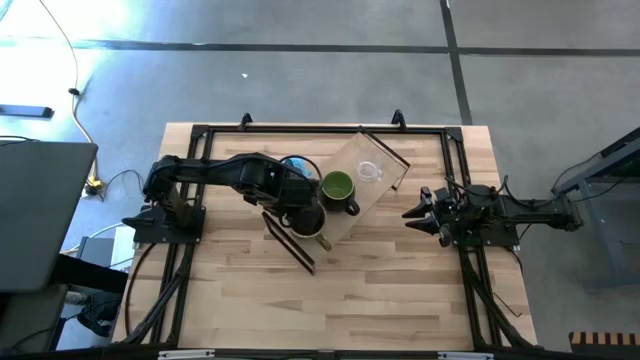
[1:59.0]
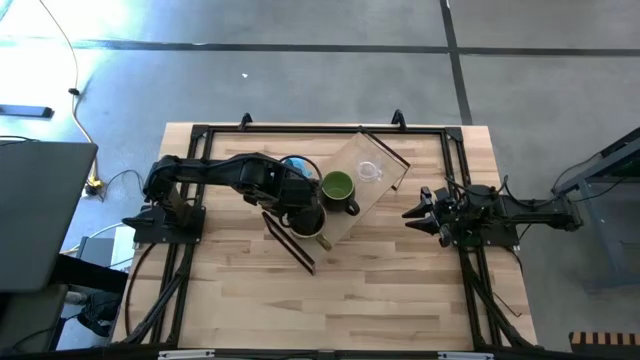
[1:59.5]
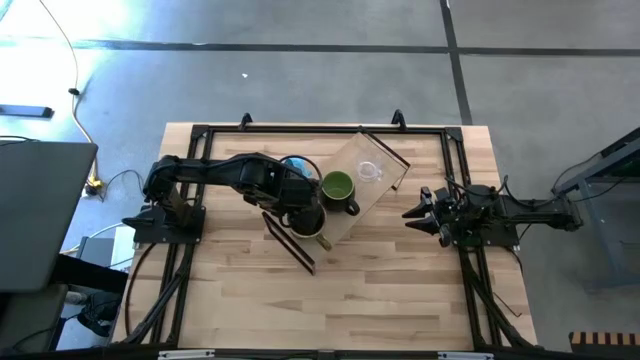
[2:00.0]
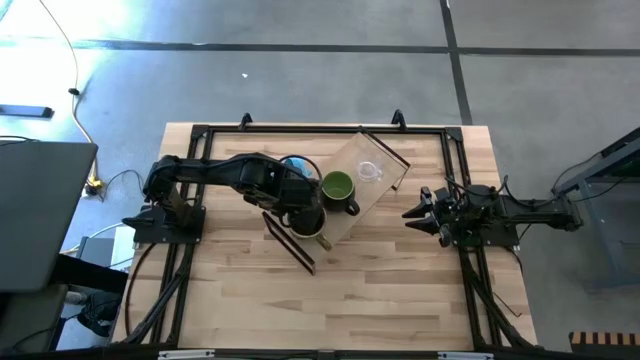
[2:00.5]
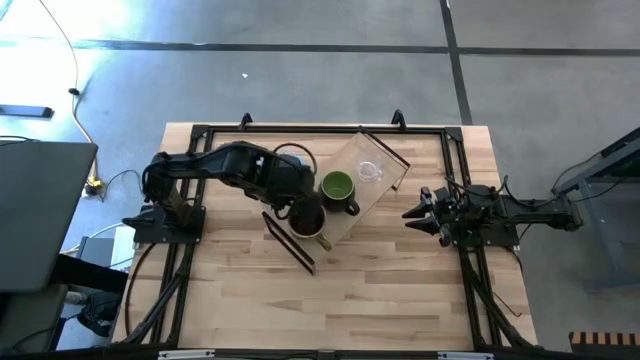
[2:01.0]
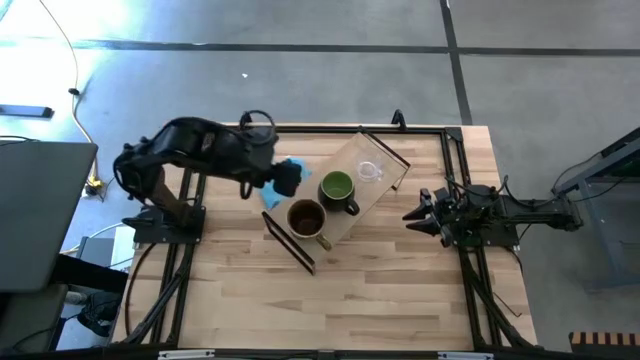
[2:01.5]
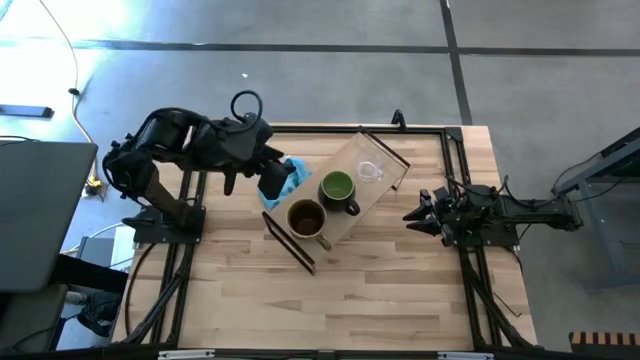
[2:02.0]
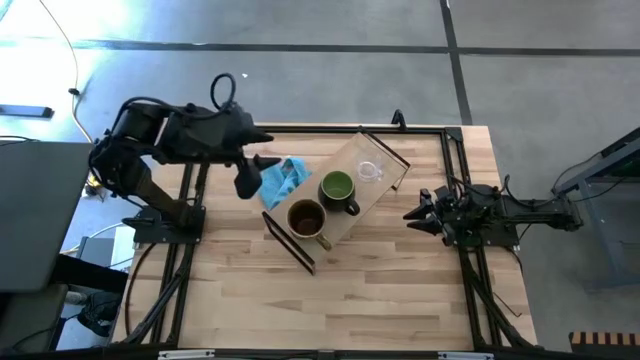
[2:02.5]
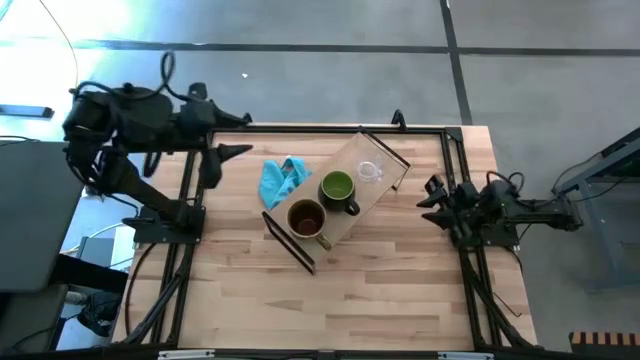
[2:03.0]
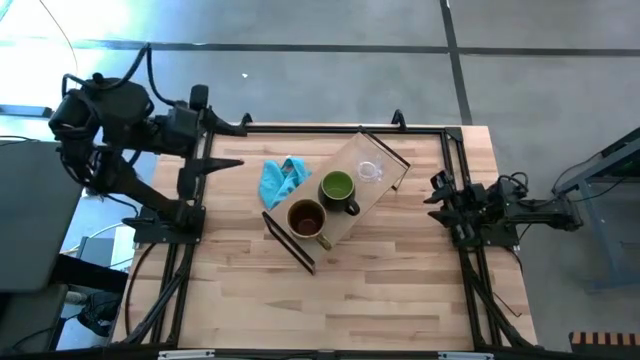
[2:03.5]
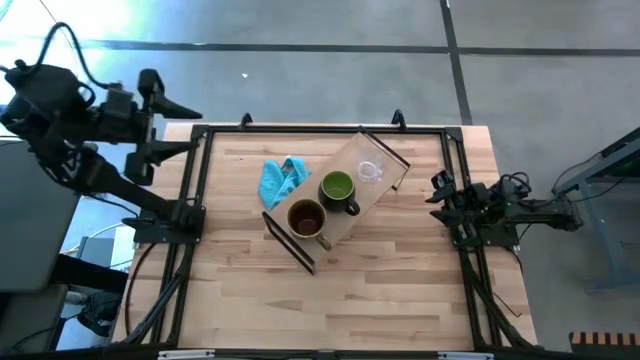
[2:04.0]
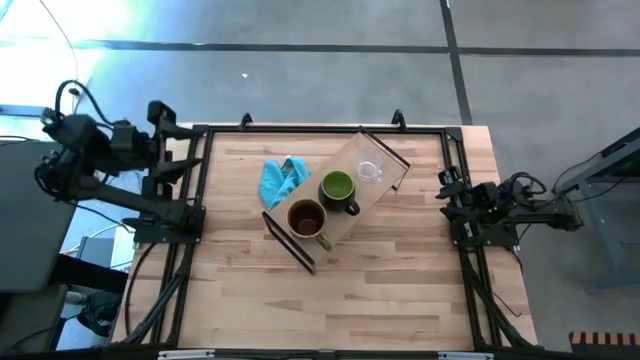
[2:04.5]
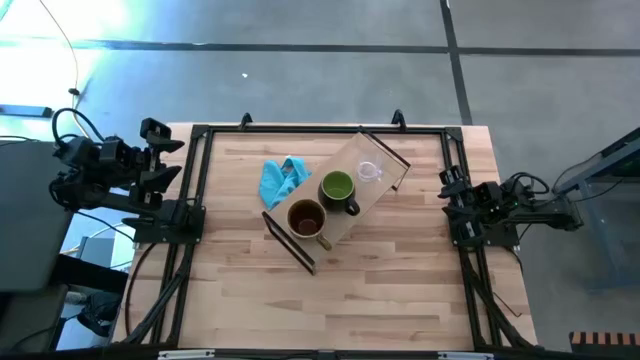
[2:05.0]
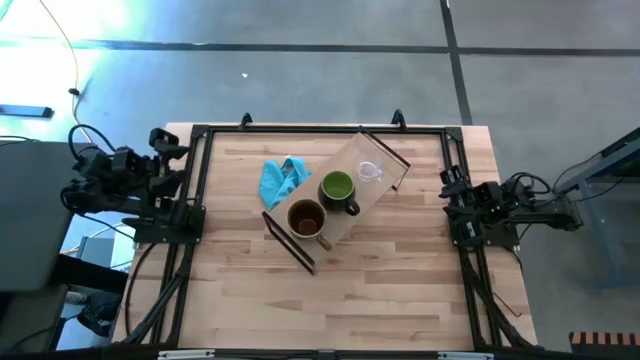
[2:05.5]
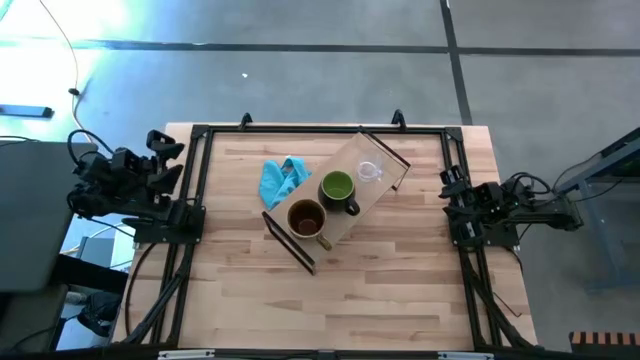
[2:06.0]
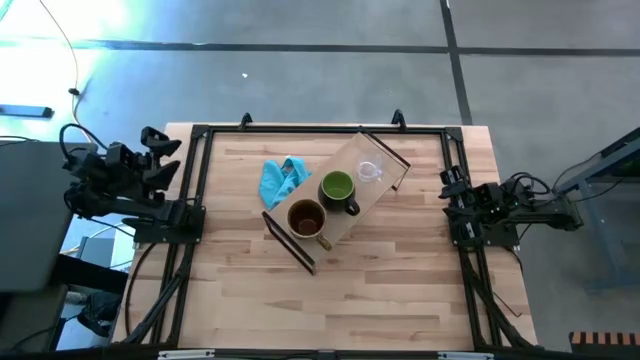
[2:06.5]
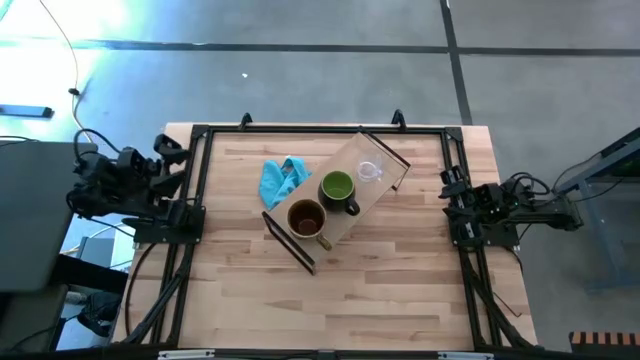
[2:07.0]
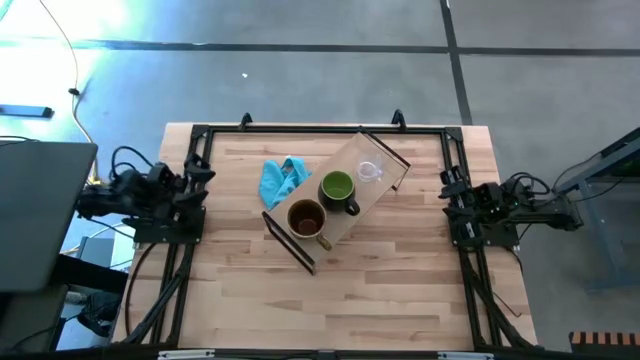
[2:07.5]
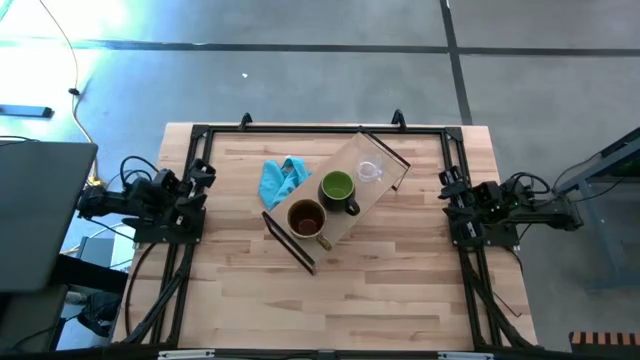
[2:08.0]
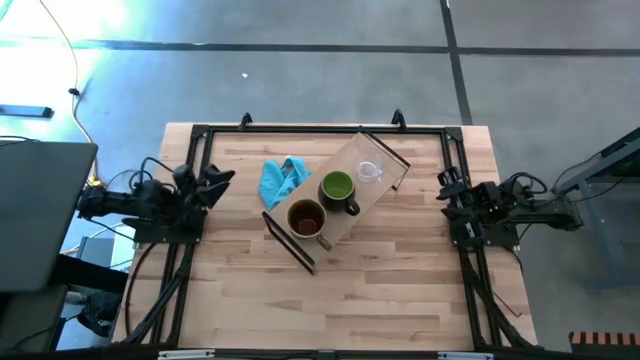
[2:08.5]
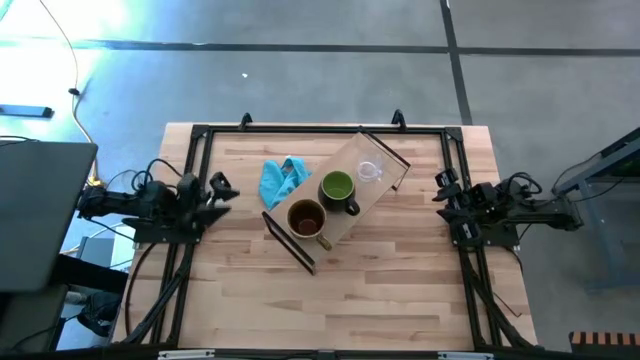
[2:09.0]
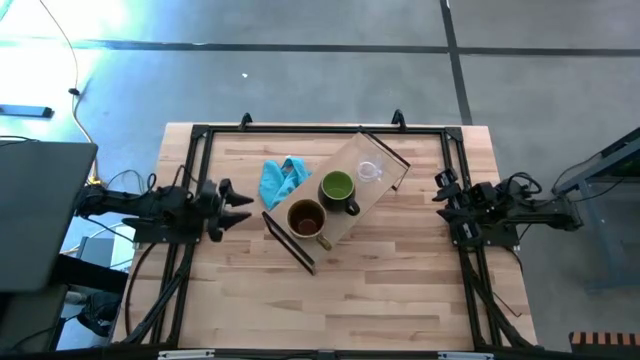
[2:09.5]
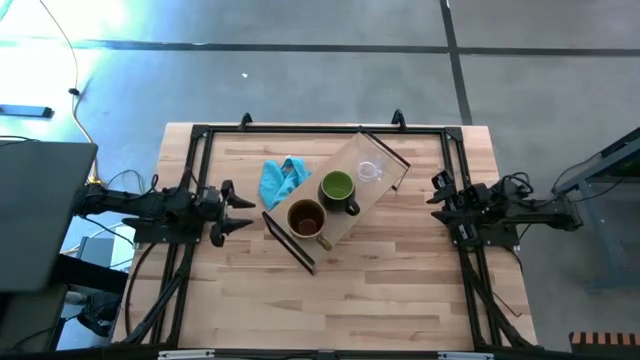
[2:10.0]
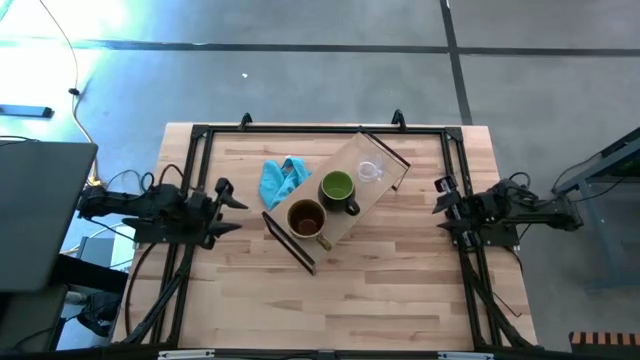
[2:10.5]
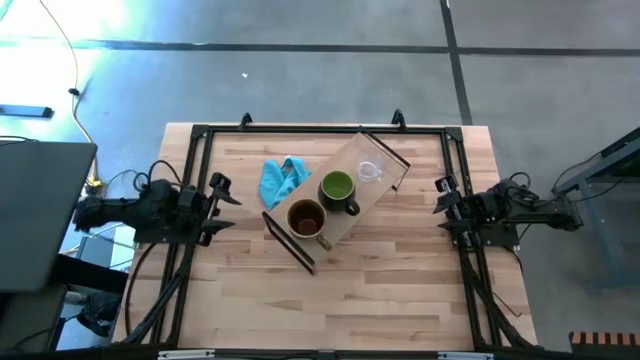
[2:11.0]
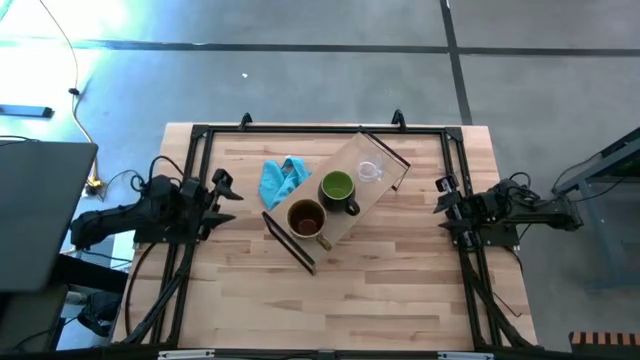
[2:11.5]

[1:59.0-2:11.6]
Task: Stack small to large cups/mugs on shelf
Return to Home Position
